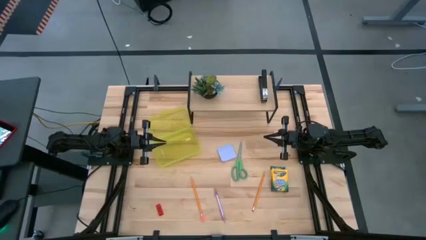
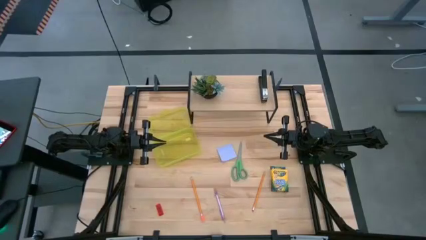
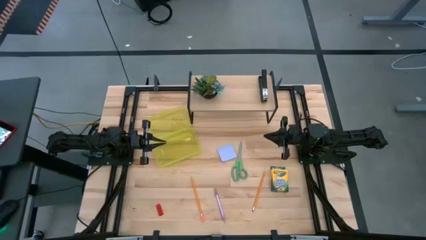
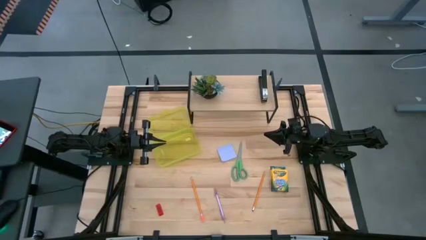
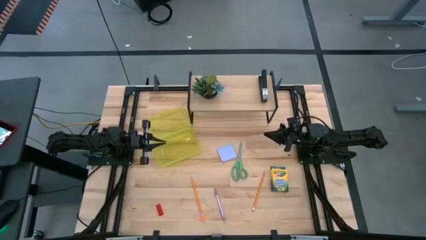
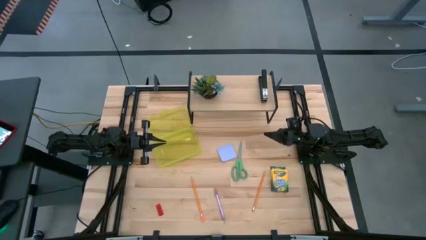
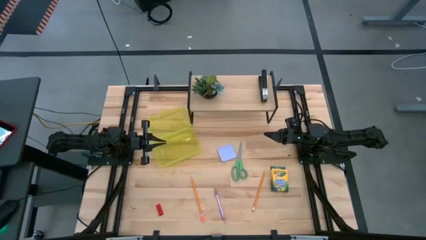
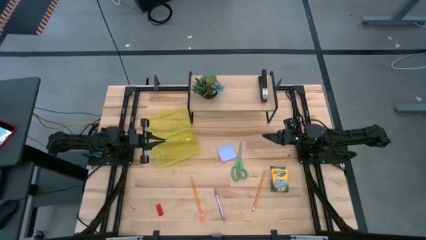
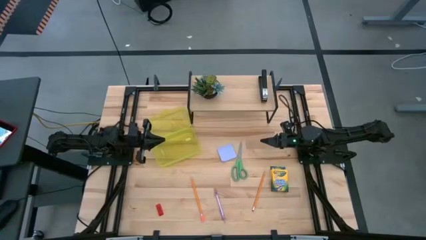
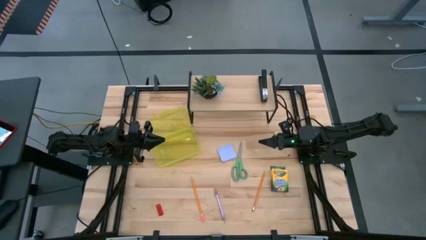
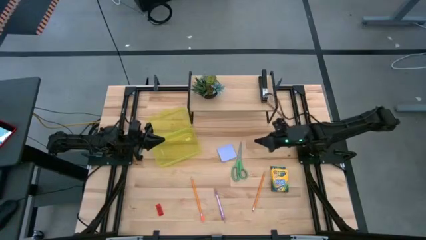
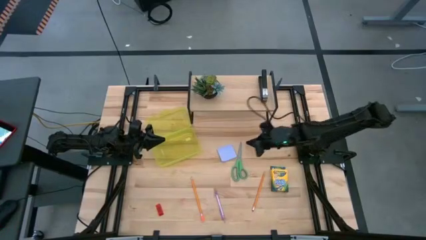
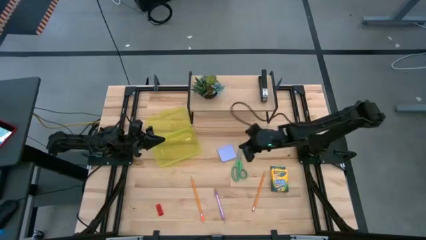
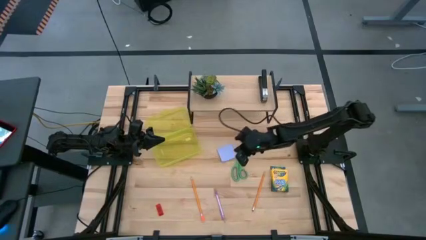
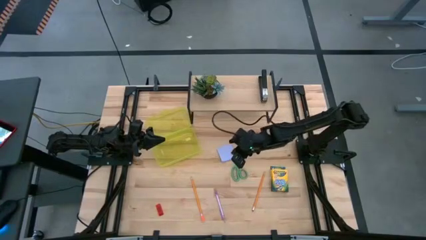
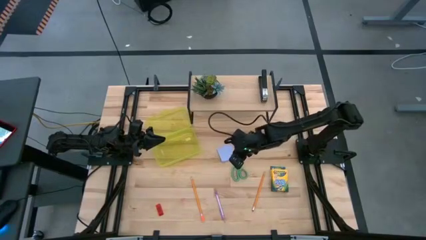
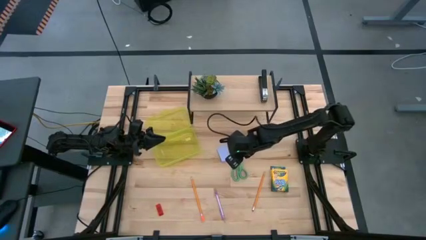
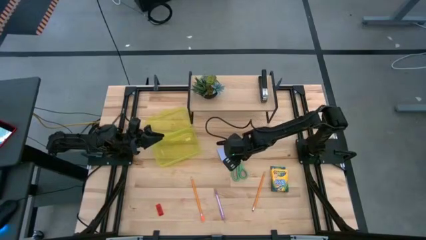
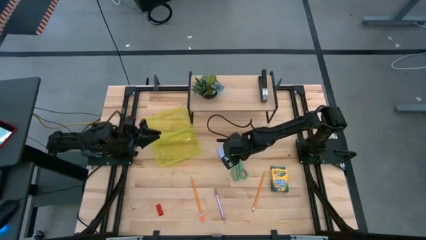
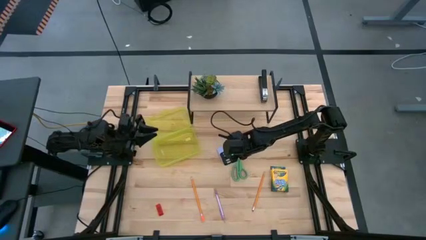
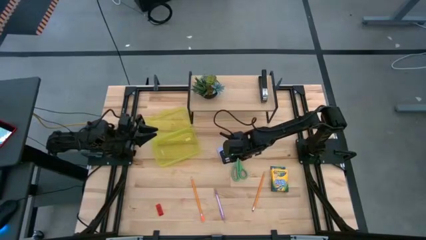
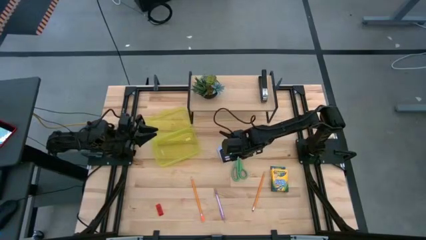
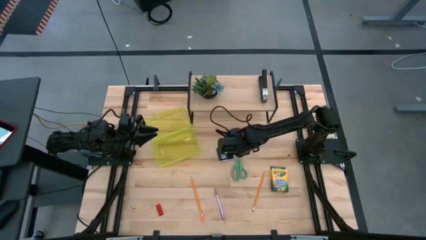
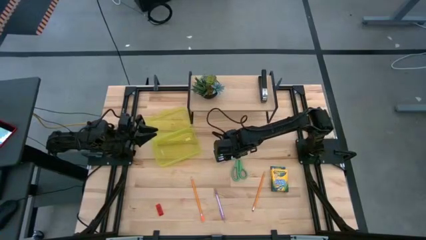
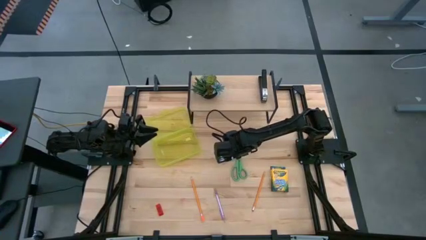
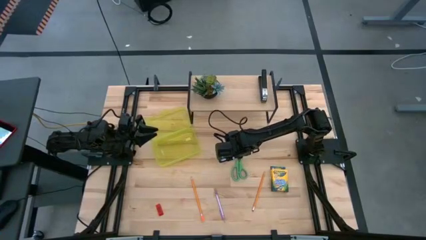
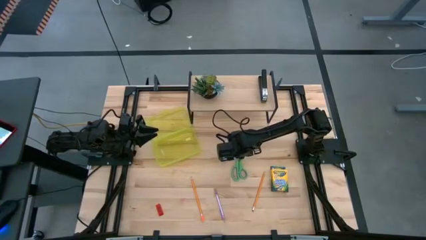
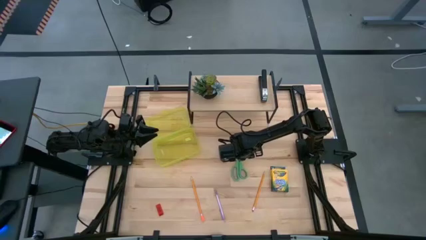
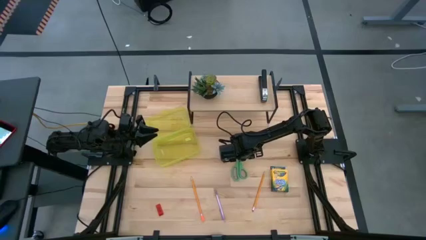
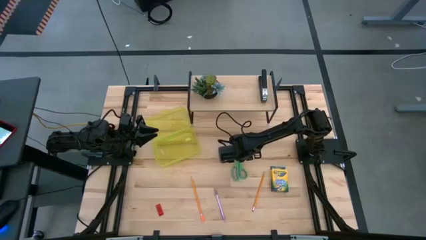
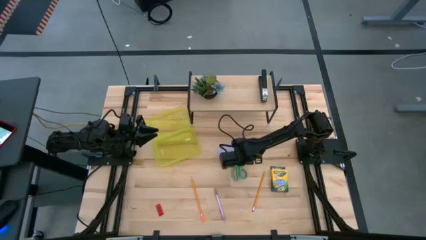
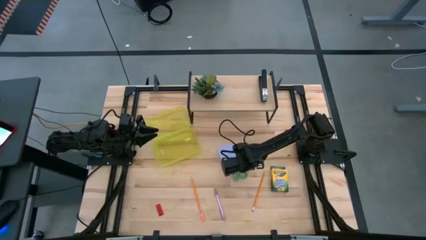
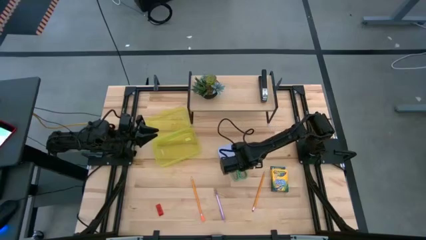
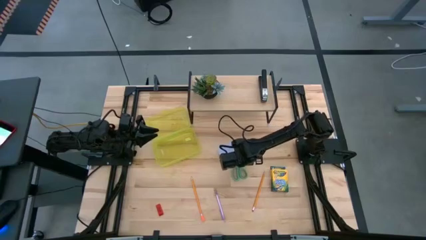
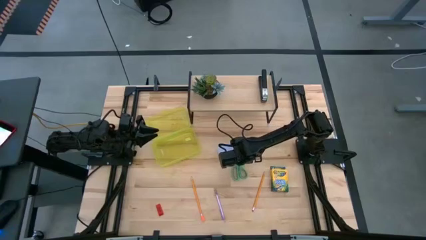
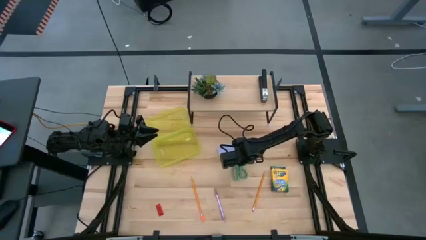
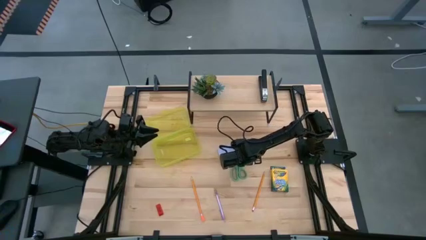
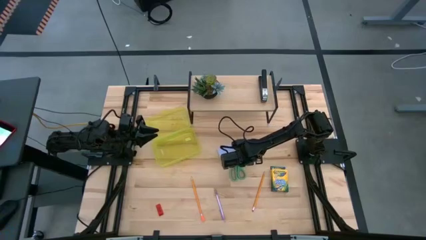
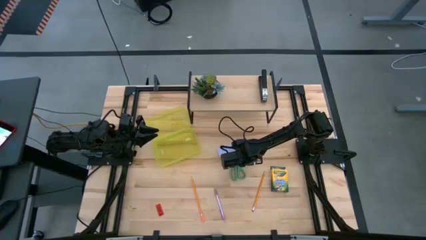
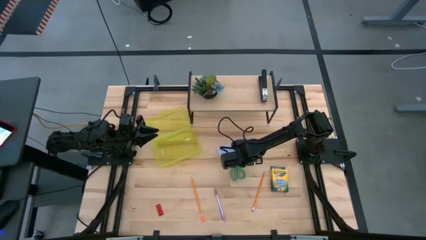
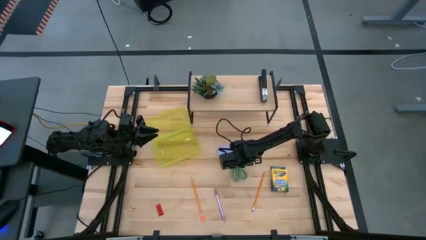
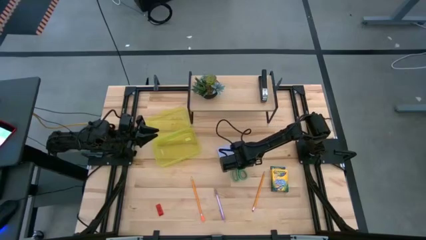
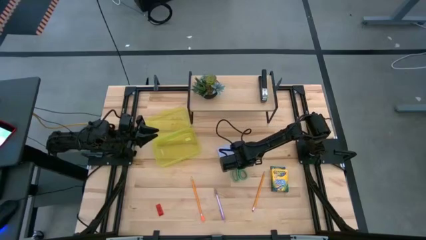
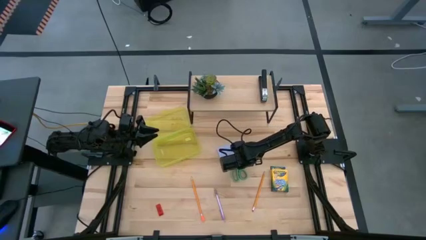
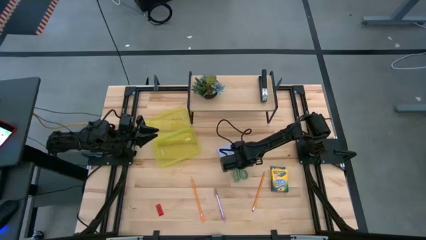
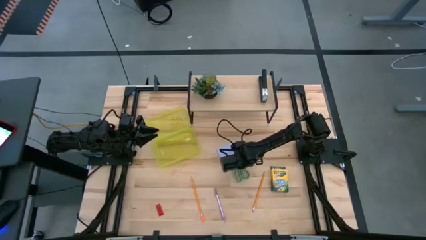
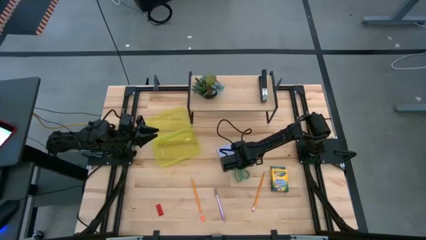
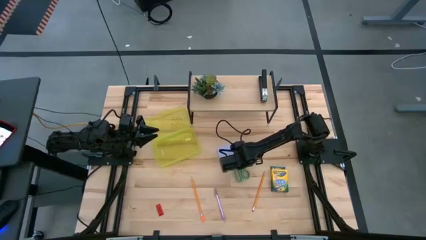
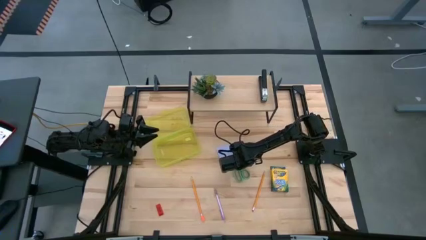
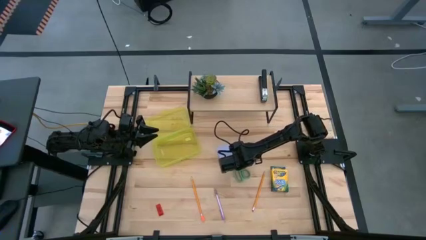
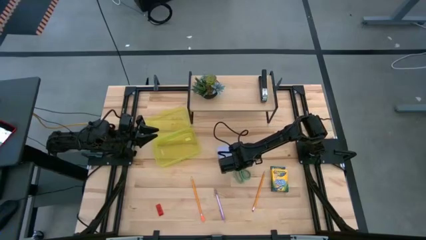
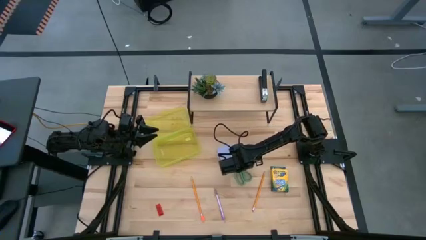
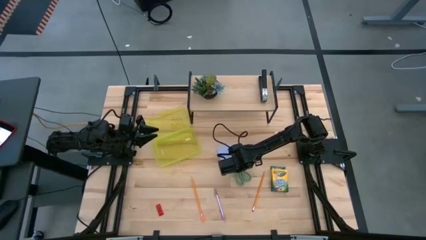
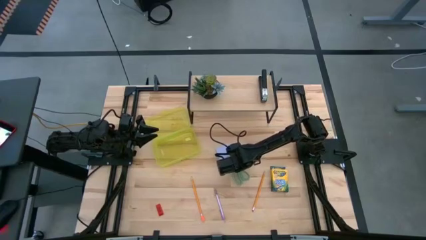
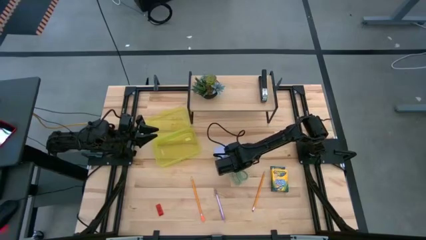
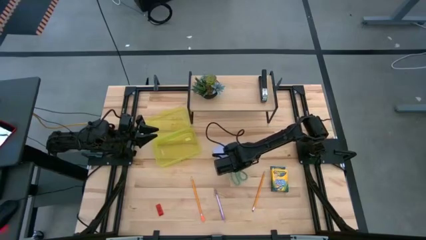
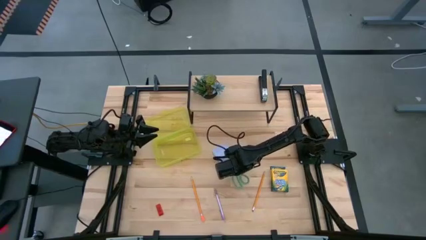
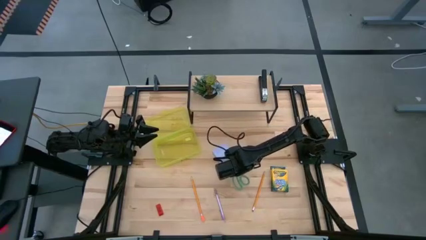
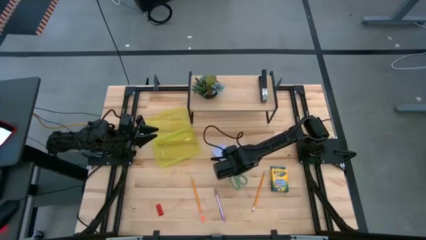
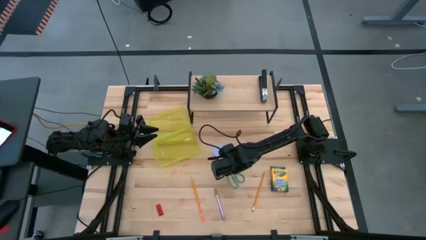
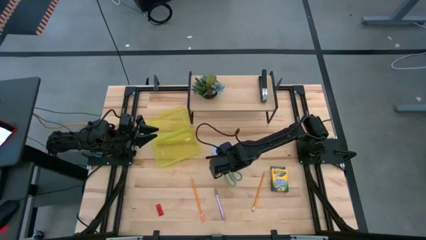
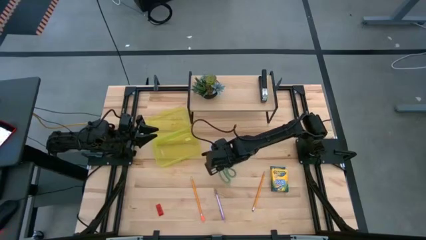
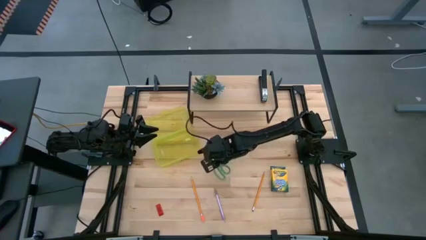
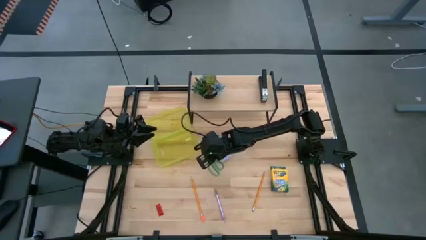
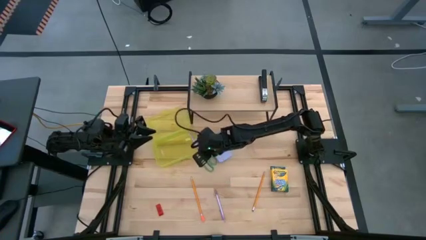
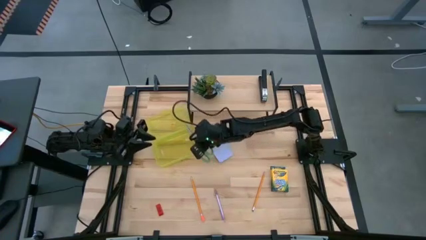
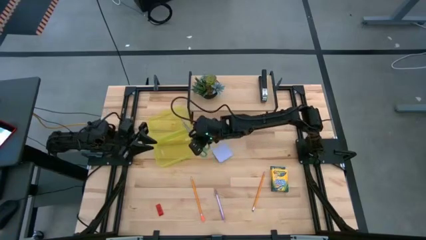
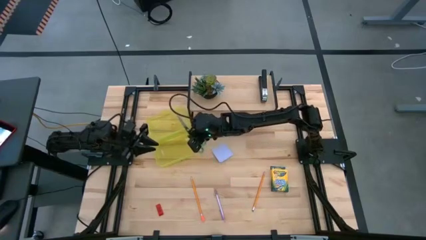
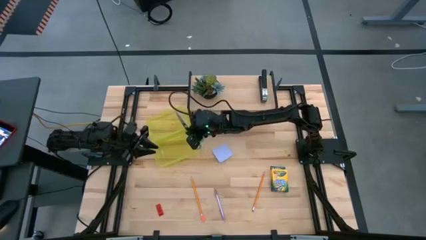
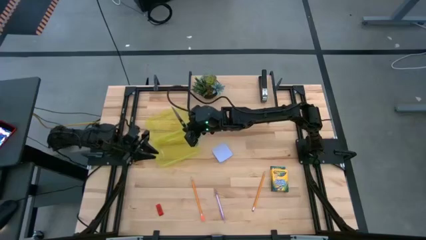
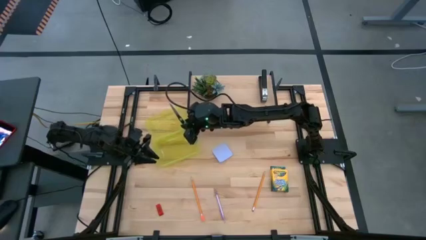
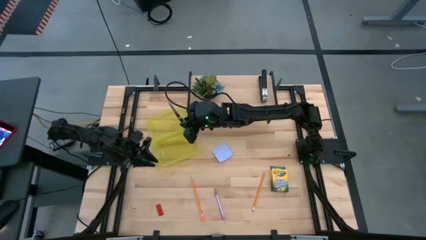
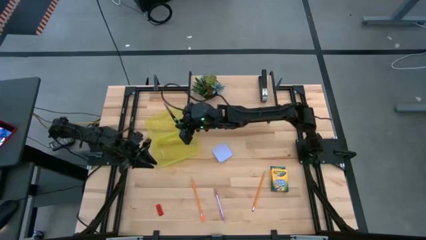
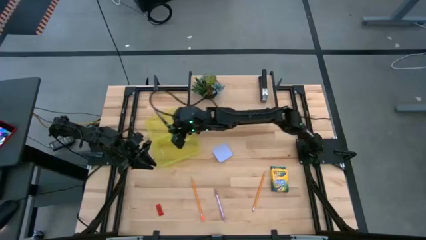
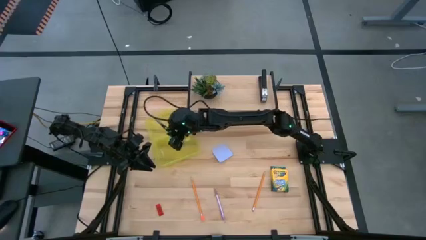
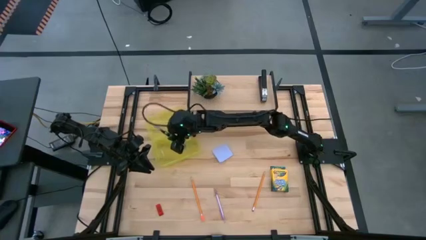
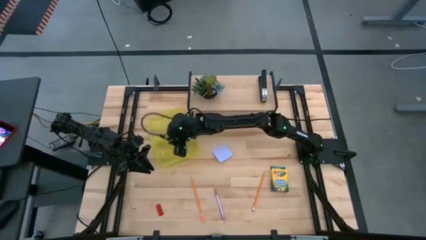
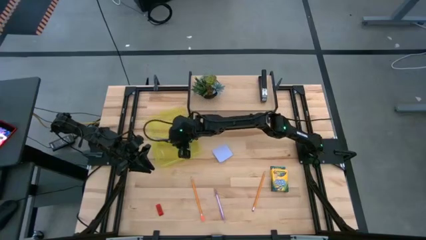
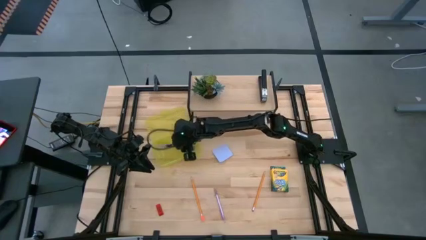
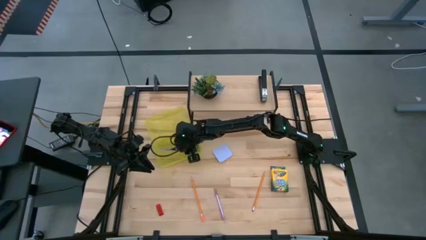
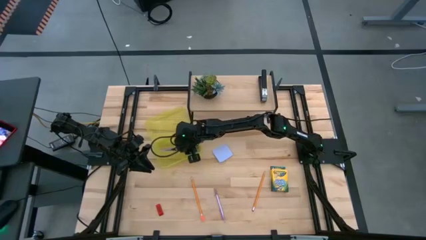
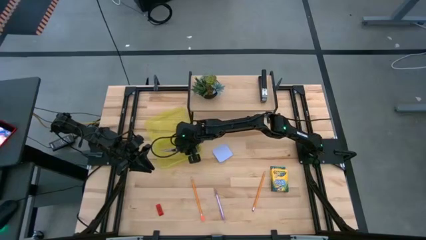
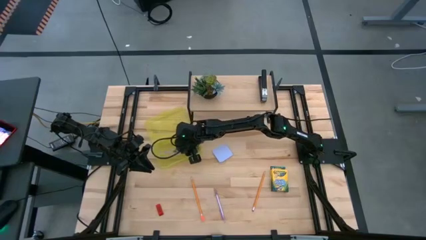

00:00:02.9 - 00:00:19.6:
Task: Pack school essentials
Put the green scissors into the yellow supply box
